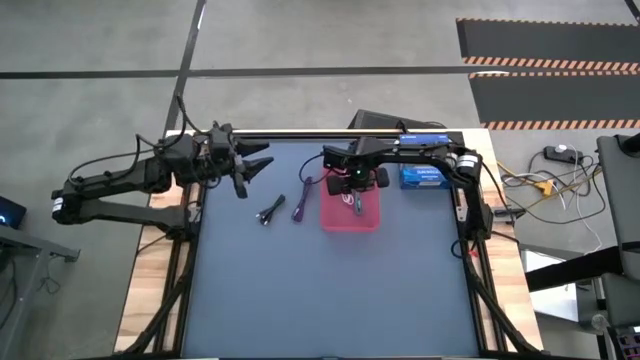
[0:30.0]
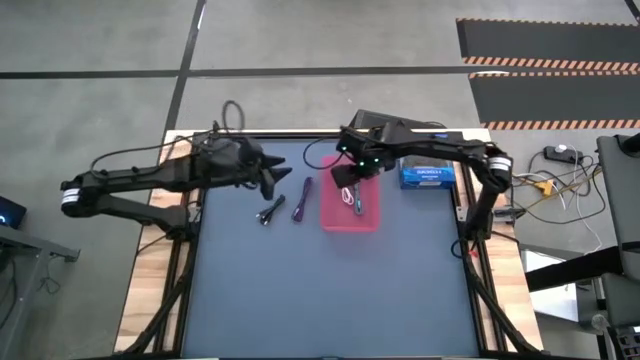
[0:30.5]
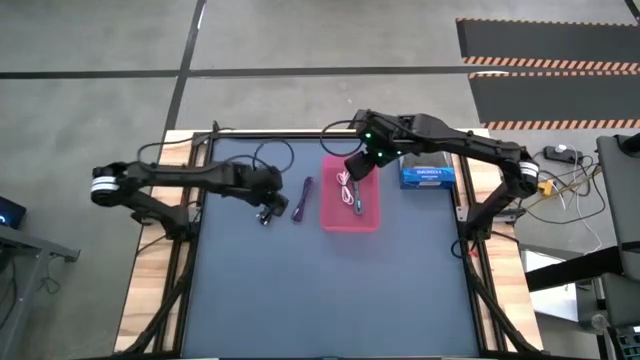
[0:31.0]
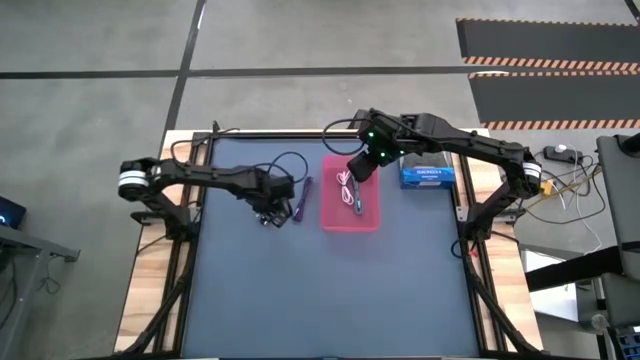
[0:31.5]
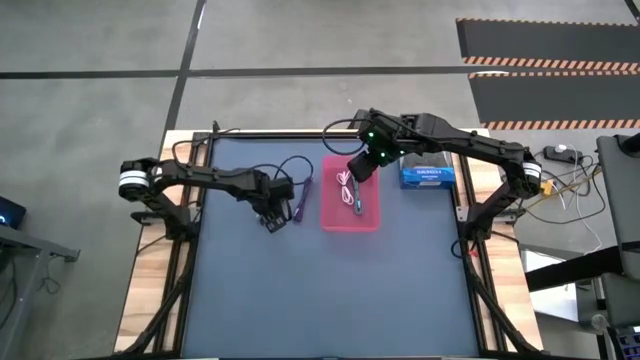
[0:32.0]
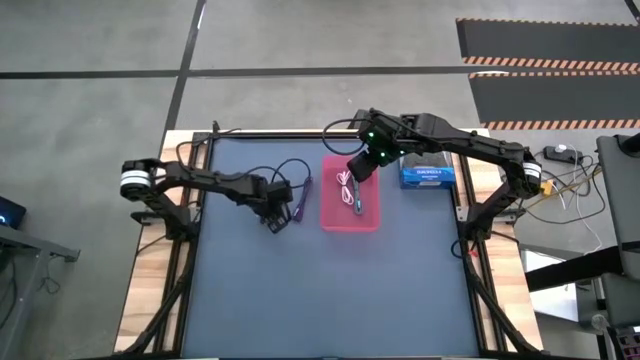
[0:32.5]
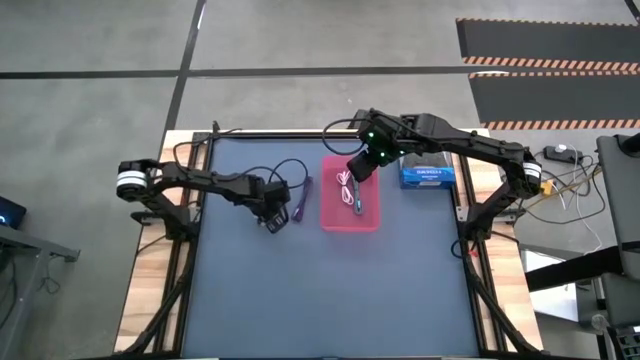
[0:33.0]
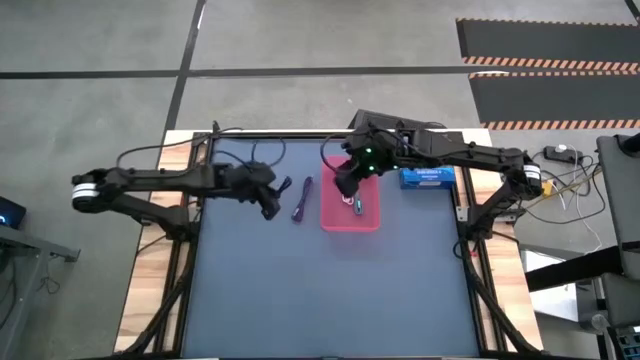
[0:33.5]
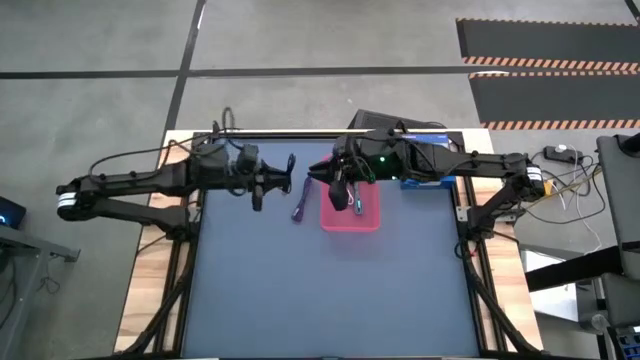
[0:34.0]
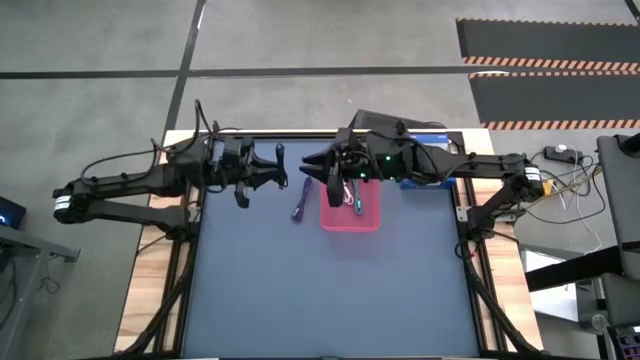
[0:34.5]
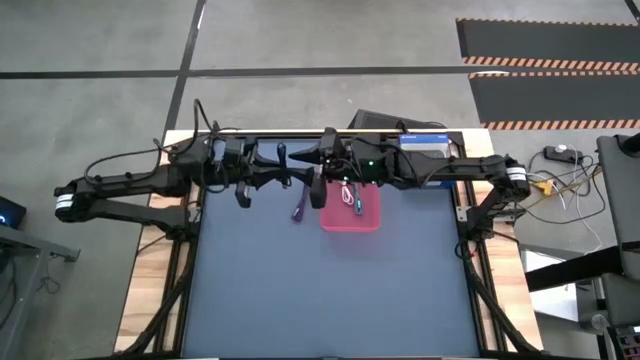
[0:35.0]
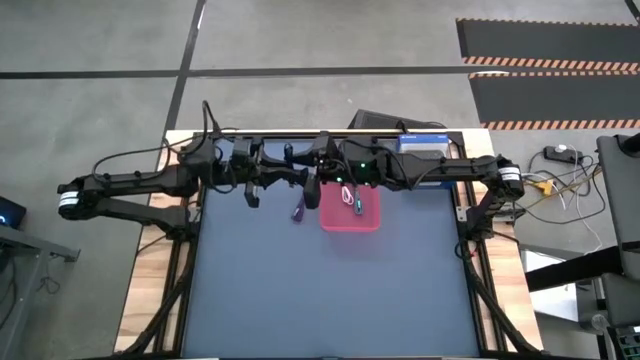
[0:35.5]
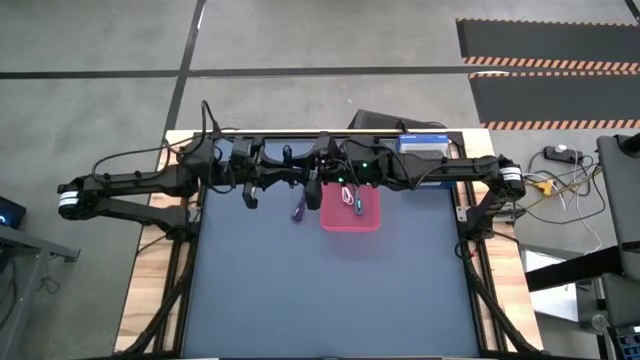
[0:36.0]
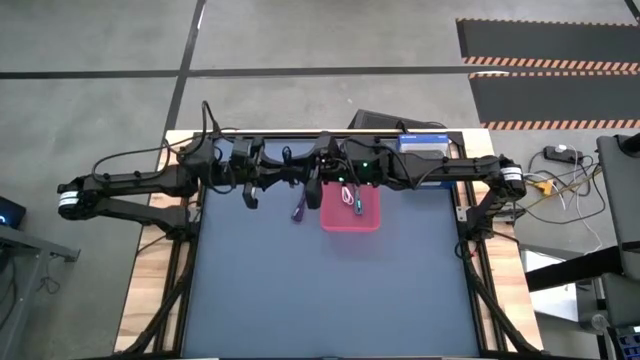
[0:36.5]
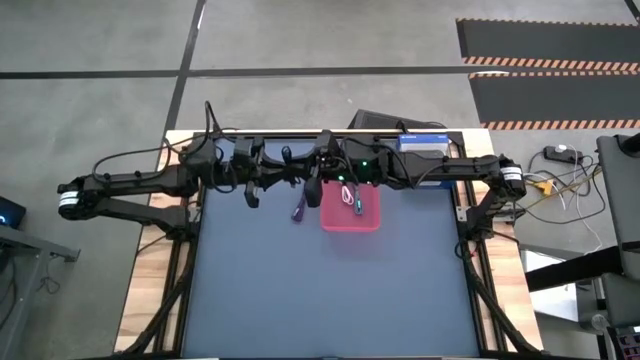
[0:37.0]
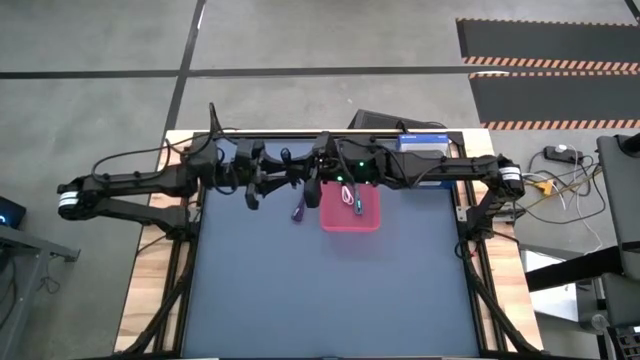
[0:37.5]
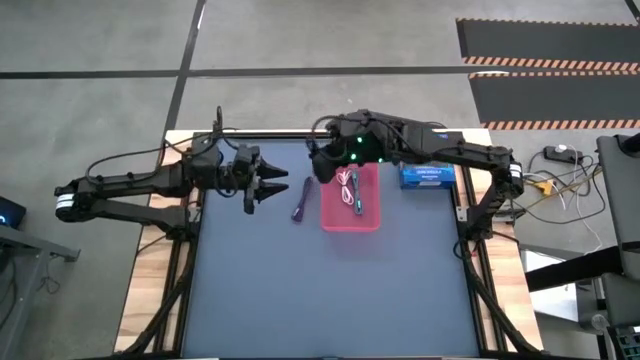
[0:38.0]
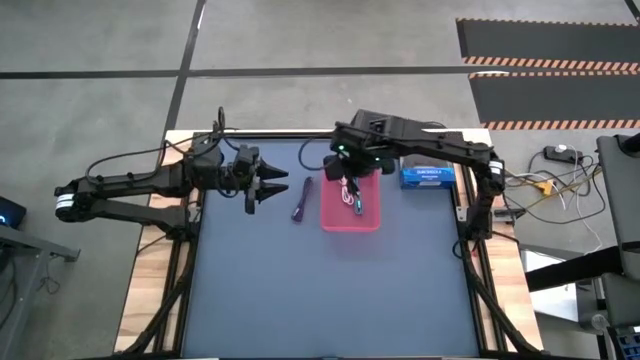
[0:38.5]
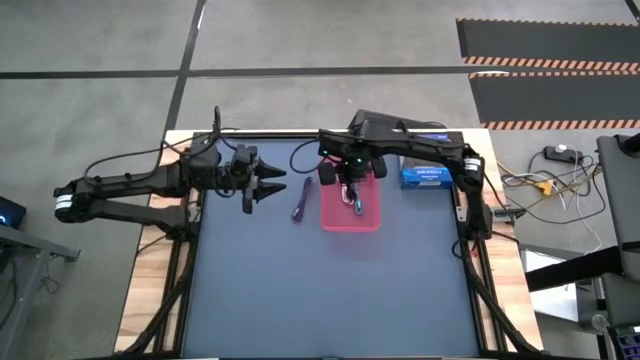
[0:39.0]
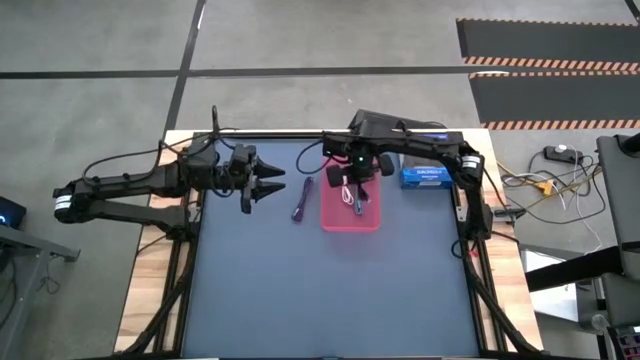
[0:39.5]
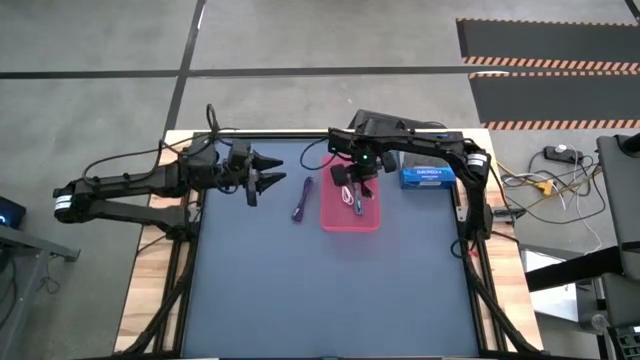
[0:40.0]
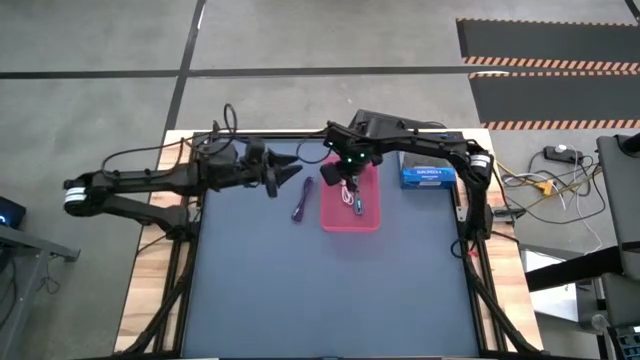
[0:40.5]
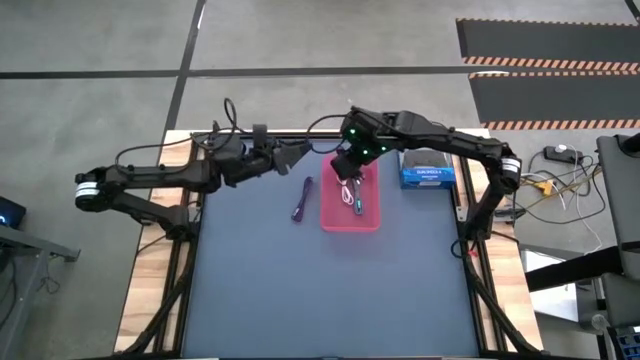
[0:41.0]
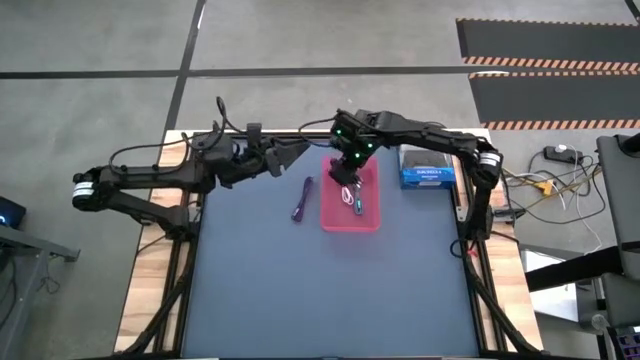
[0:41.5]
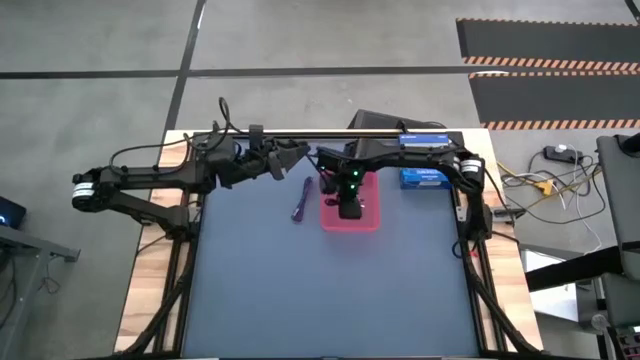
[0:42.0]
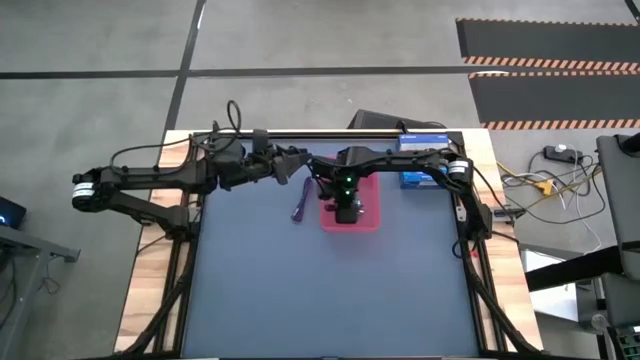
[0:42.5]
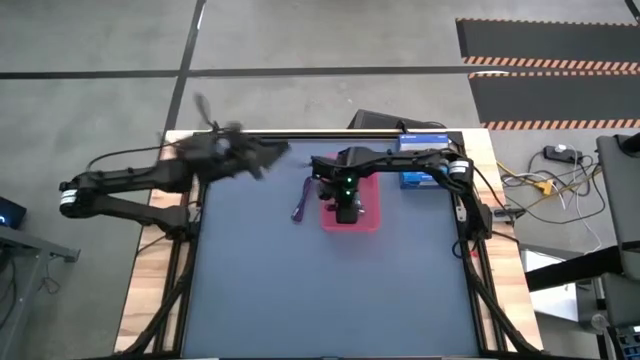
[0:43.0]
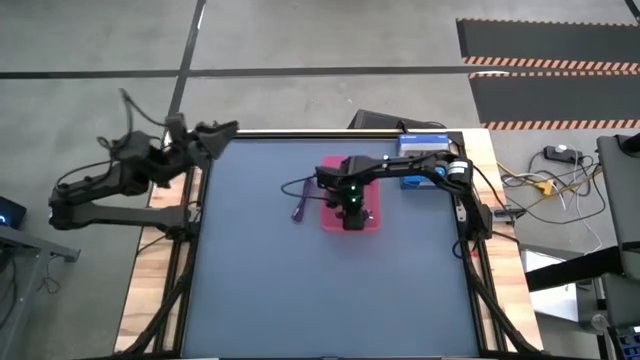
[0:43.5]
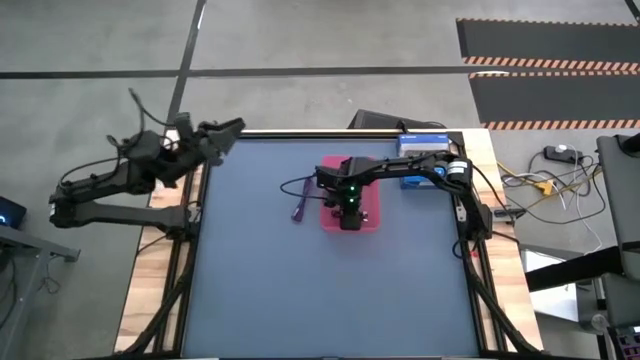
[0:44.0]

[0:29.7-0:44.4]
Task: Pick and place USB-C Cables
Put the black USB cable into the red bin

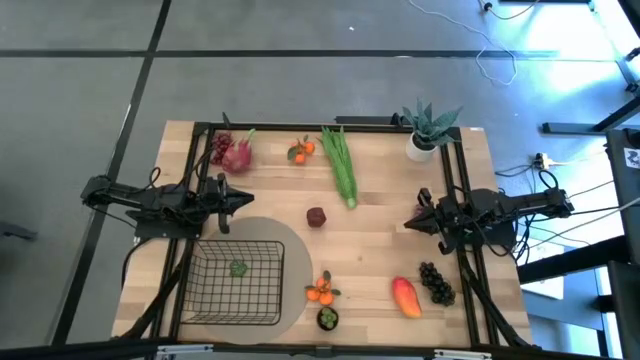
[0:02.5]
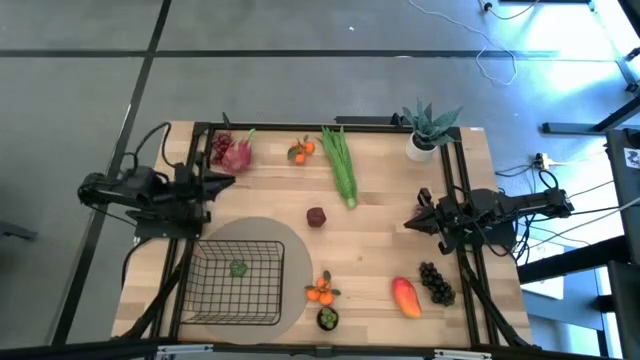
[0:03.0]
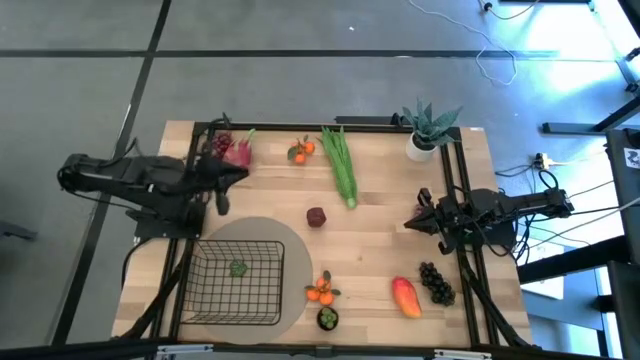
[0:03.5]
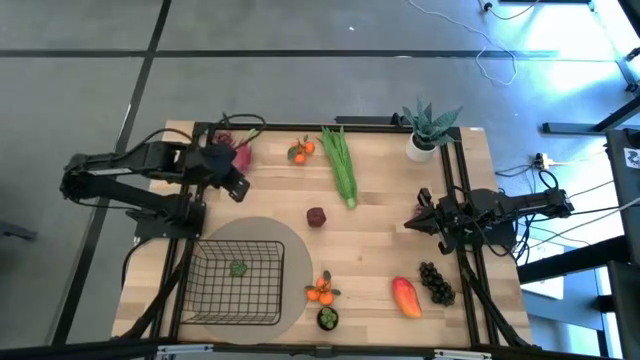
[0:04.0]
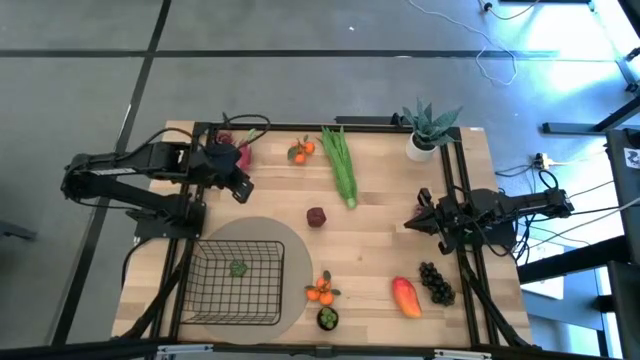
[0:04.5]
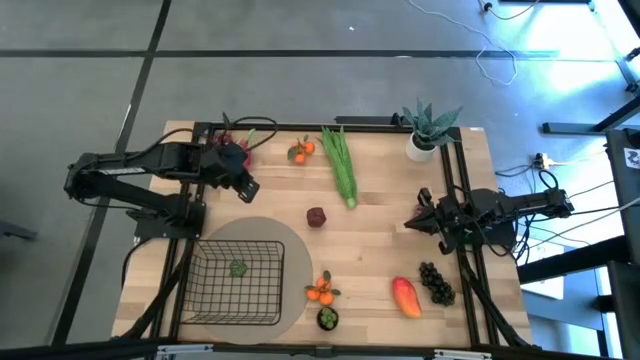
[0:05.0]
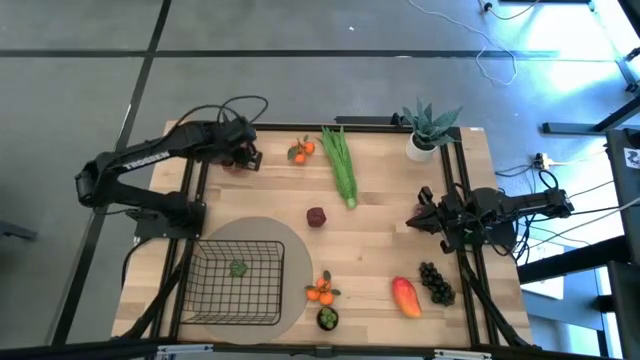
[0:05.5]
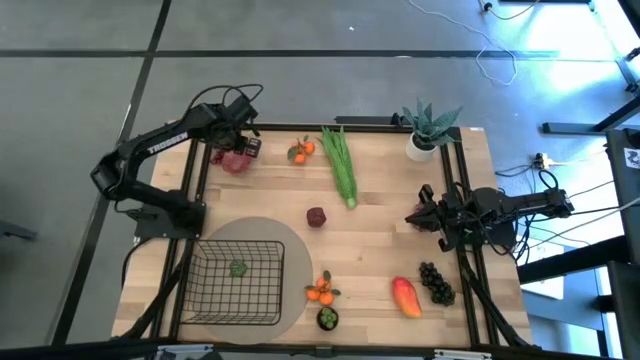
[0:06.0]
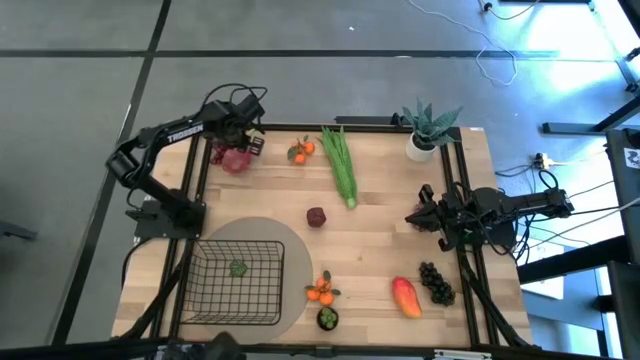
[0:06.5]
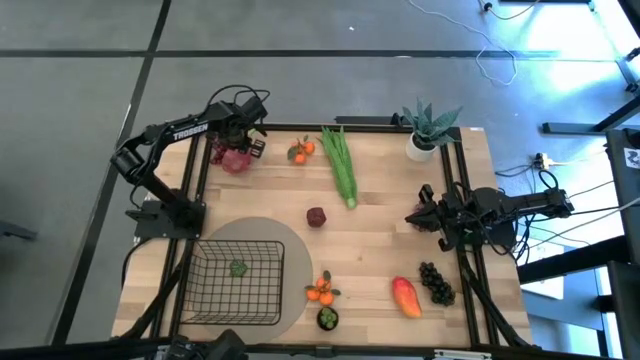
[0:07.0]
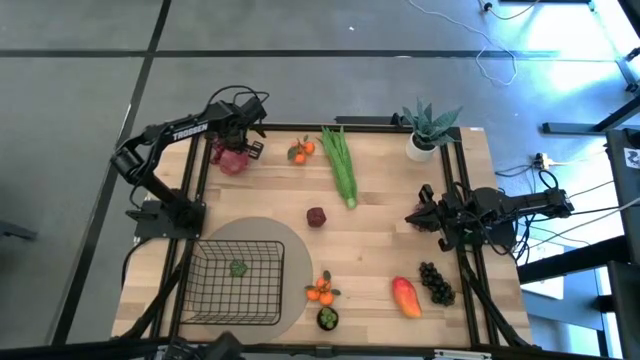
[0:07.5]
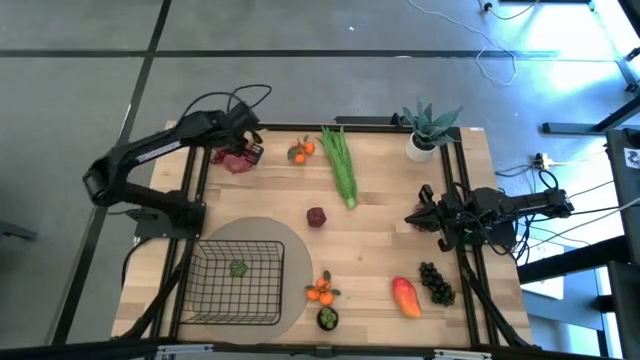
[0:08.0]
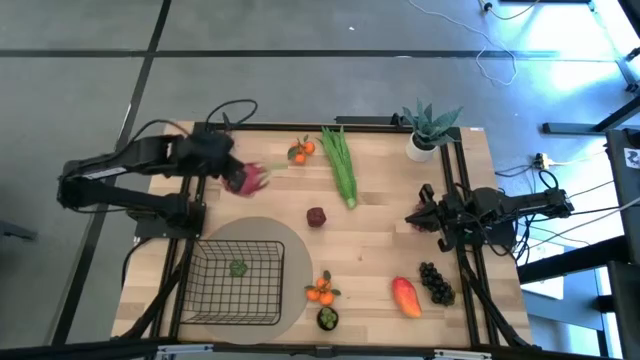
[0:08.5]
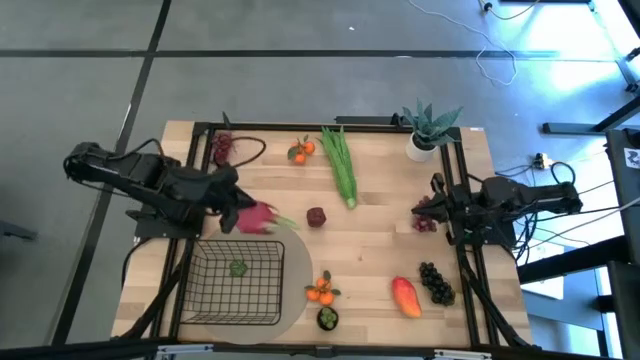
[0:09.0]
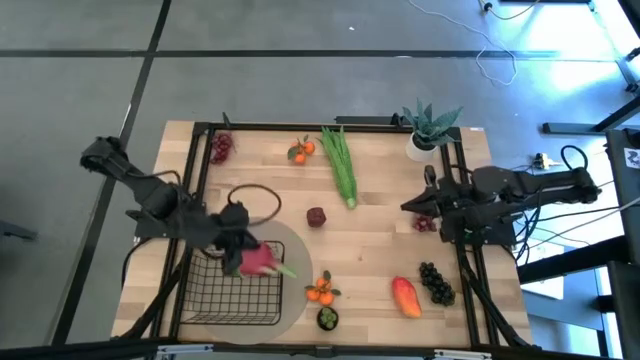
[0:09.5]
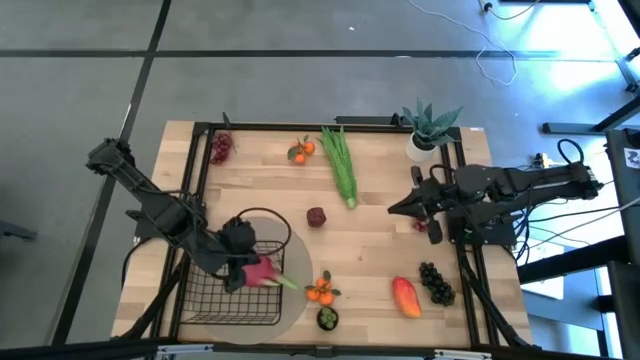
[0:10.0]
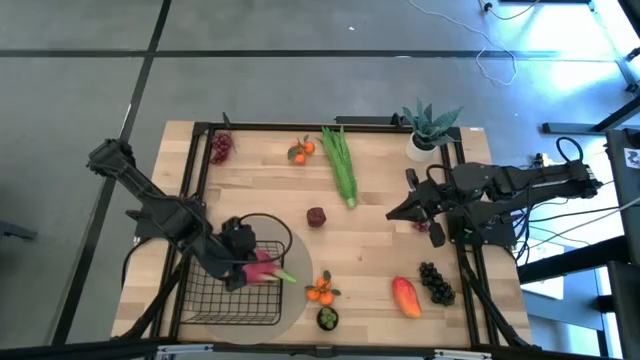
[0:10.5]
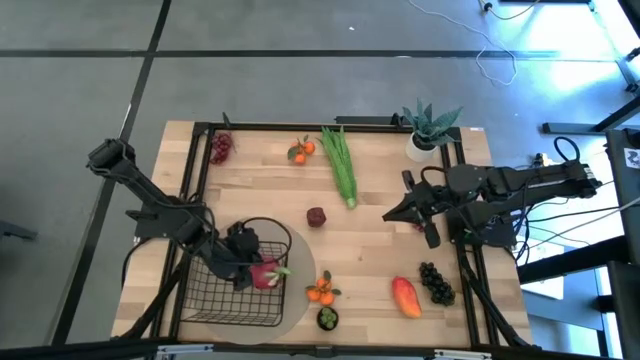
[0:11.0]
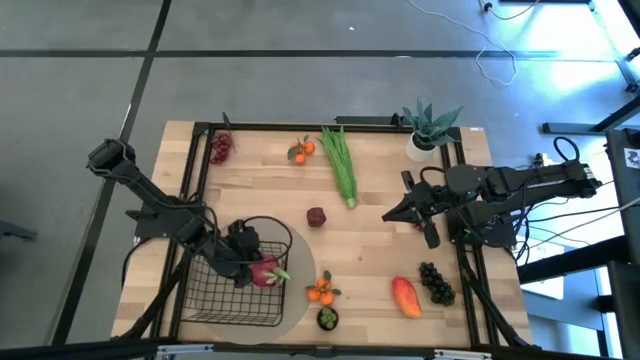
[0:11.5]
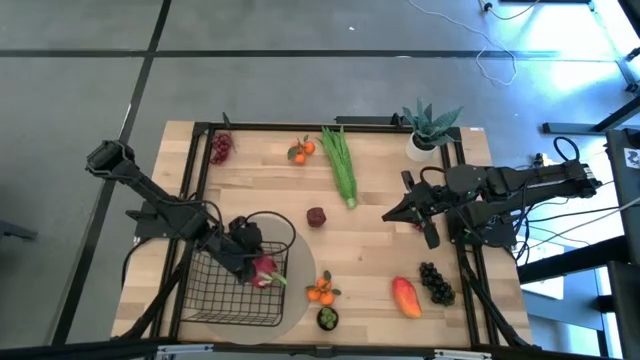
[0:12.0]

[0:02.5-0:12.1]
Task: Build produce basket
Put the pink dragon fruit into the black wire basket
